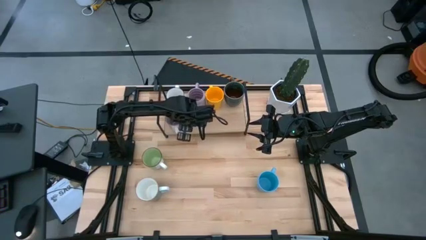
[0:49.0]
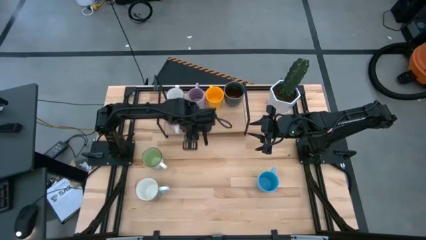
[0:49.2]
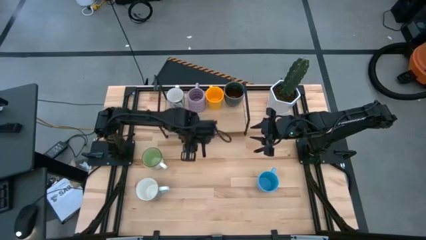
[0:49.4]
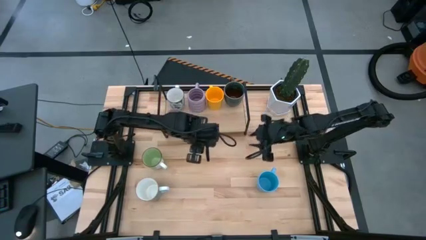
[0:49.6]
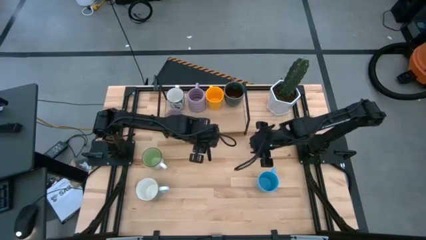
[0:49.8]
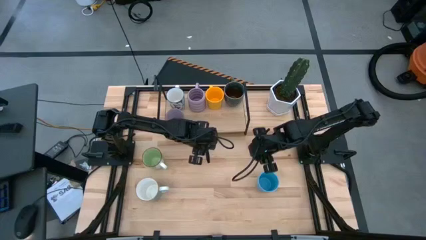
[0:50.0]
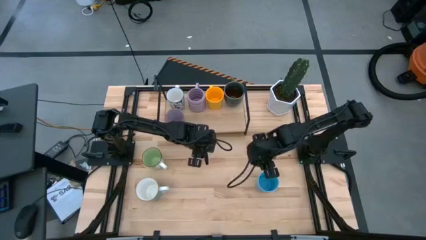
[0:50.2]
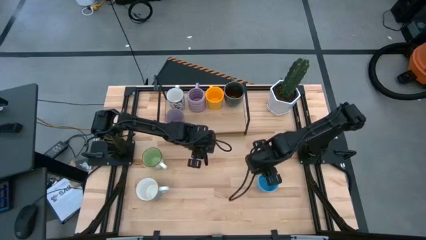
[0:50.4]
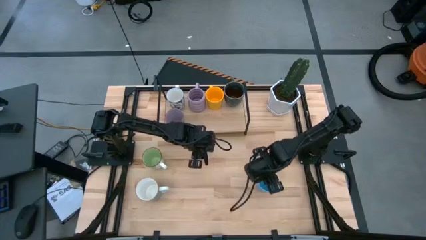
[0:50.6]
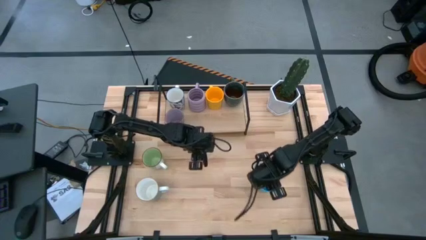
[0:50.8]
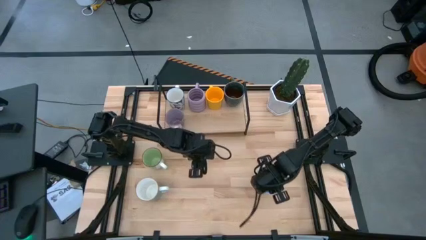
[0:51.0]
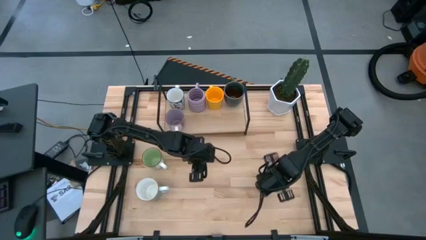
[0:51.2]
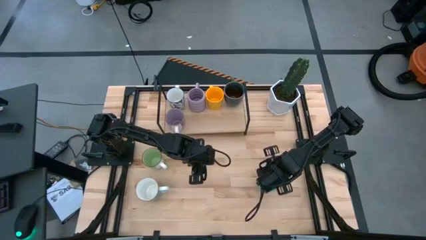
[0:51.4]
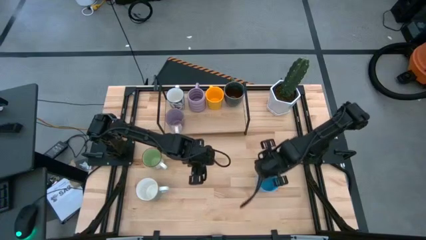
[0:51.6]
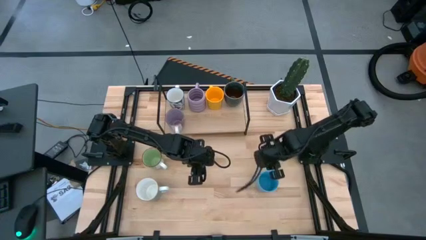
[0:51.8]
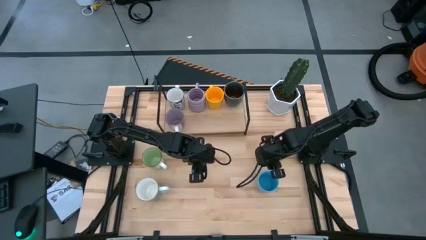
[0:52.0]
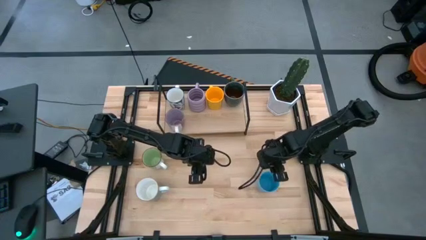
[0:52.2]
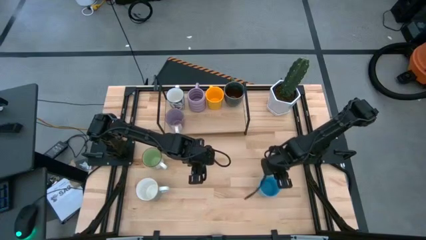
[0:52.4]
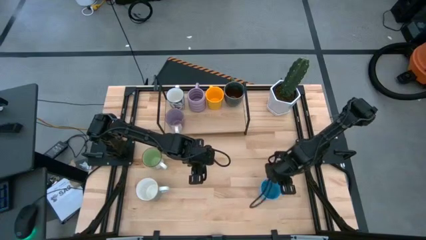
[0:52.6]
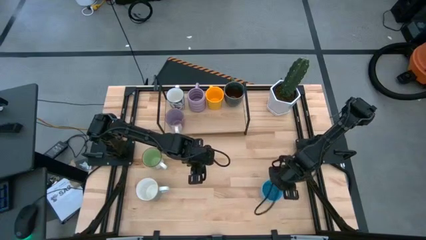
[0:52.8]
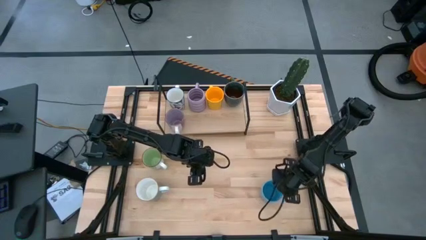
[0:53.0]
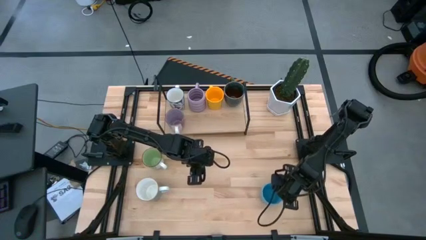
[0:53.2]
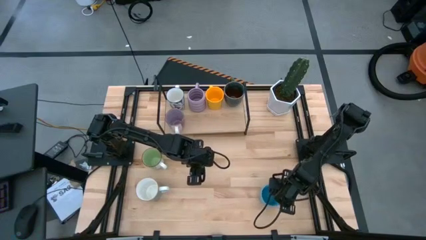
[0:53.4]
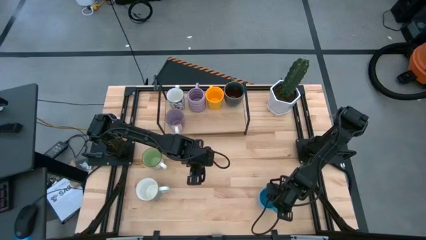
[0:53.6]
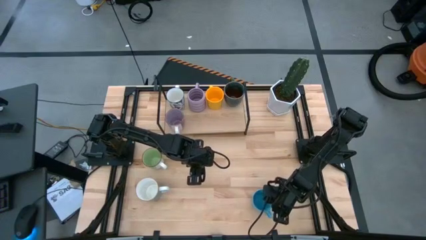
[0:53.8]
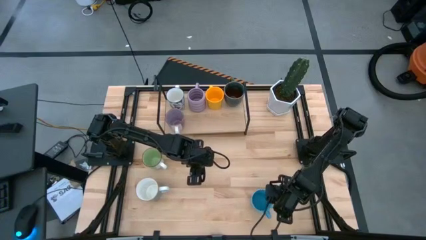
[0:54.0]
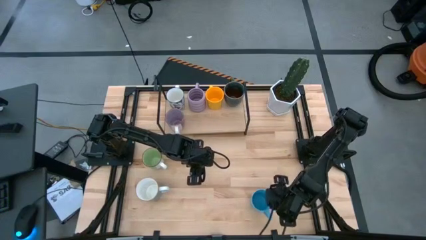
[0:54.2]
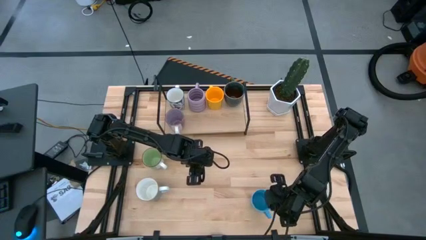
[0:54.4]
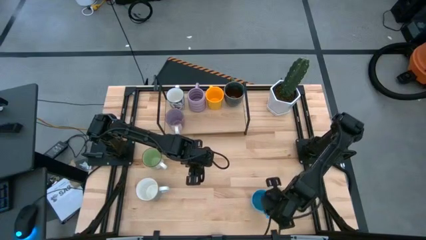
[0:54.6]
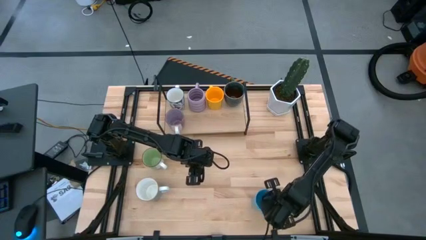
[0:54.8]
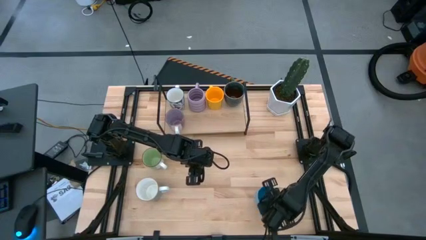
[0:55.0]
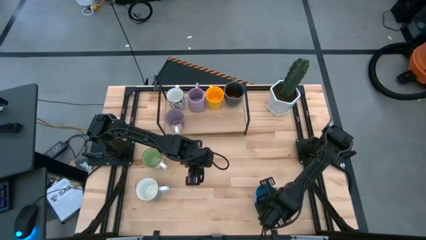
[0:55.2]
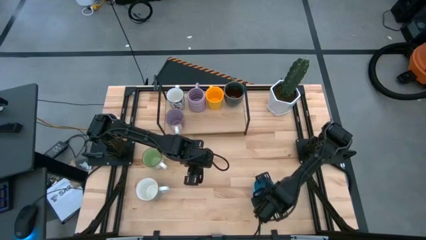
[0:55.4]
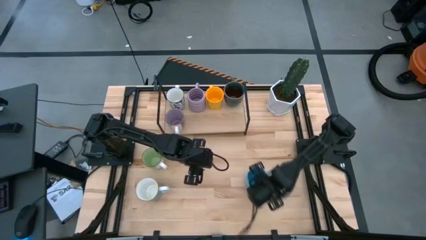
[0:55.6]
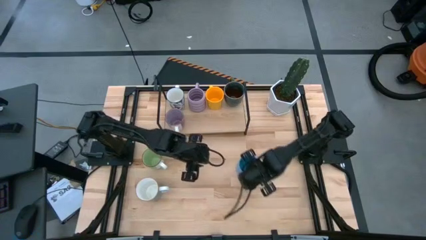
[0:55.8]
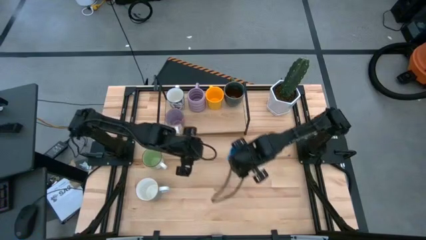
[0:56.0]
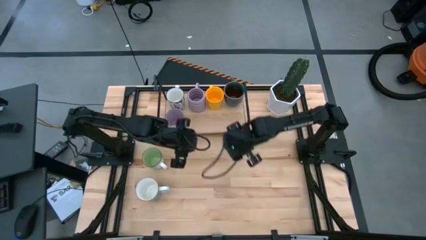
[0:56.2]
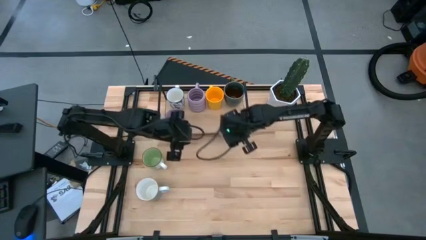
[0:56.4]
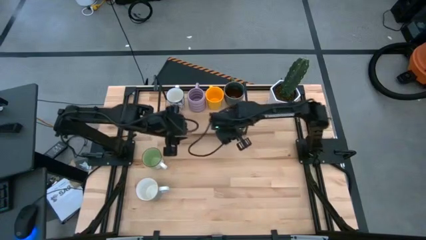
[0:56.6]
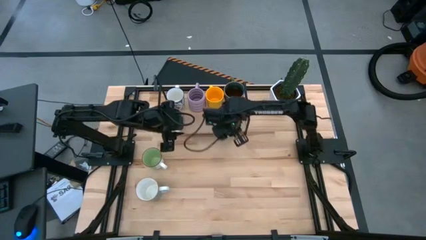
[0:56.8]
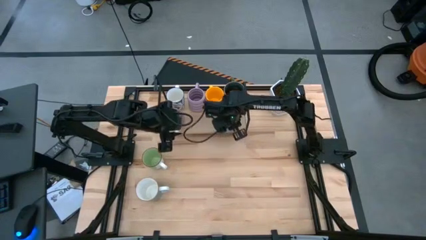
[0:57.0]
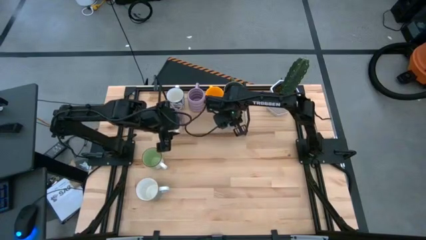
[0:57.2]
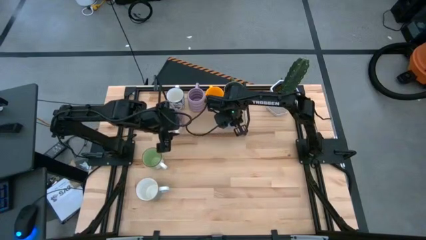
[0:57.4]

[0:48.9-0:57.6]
Task: Place coffee mugs
Put the blue mug on the shelf

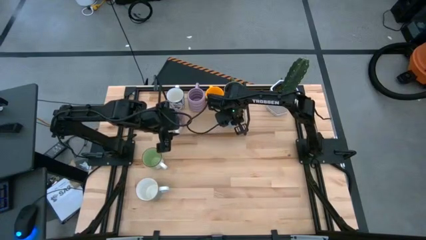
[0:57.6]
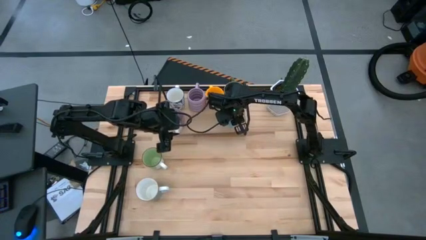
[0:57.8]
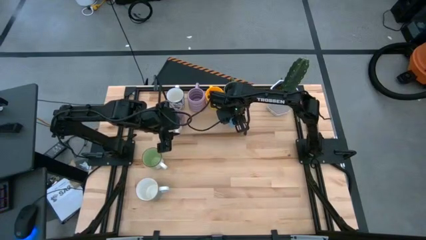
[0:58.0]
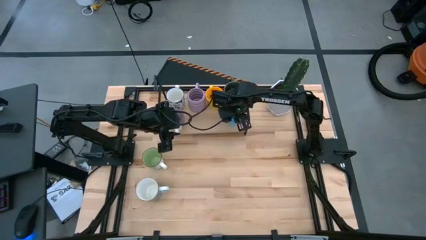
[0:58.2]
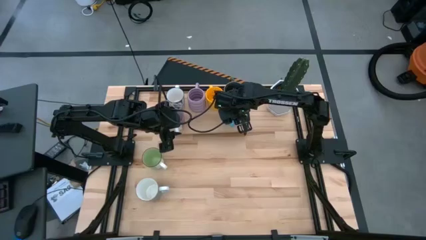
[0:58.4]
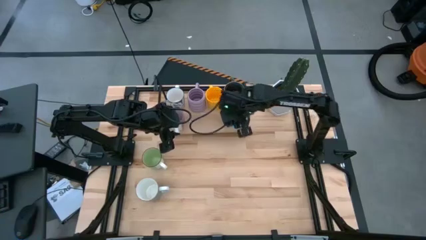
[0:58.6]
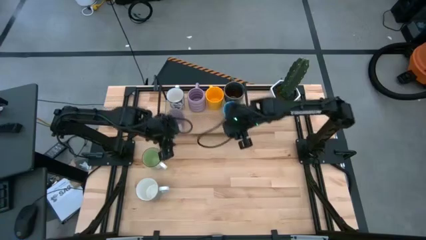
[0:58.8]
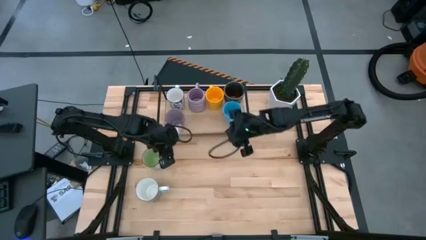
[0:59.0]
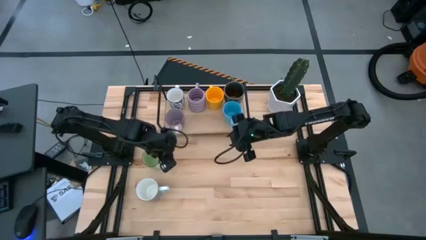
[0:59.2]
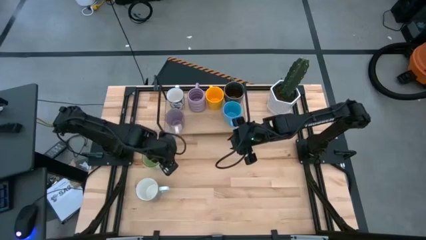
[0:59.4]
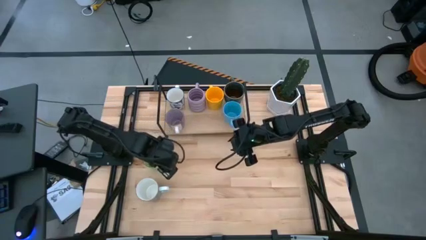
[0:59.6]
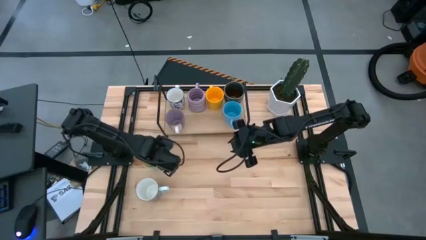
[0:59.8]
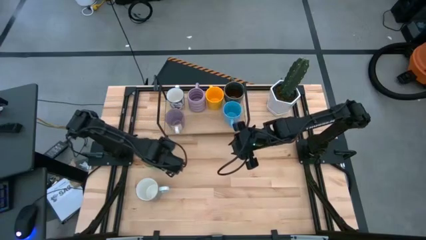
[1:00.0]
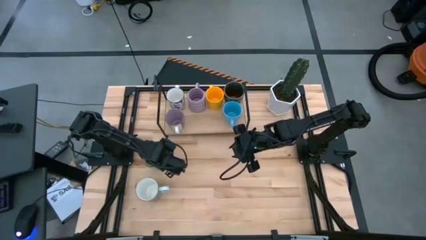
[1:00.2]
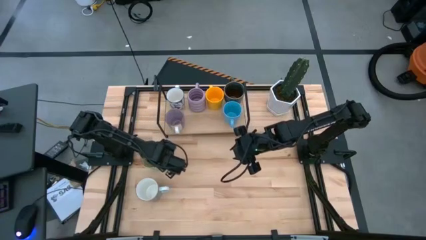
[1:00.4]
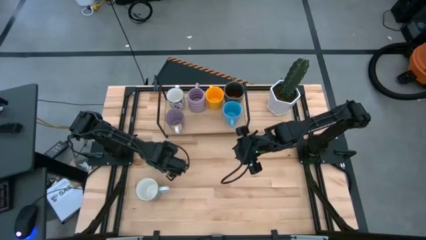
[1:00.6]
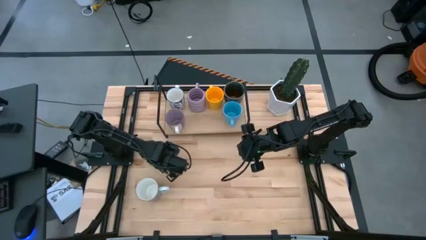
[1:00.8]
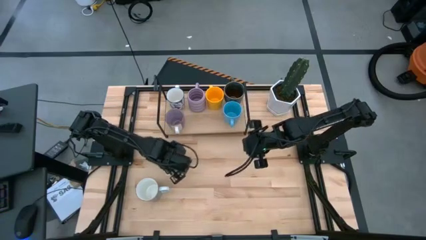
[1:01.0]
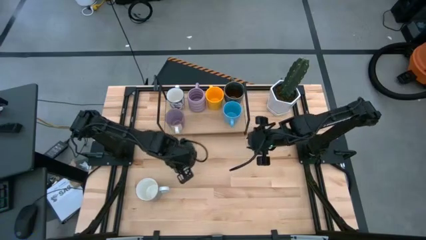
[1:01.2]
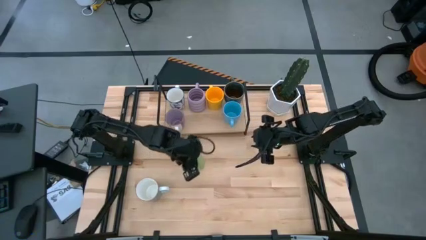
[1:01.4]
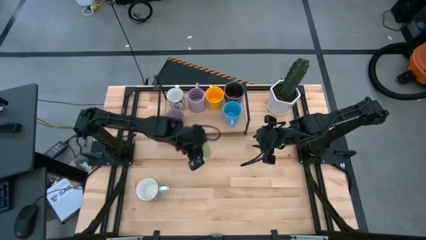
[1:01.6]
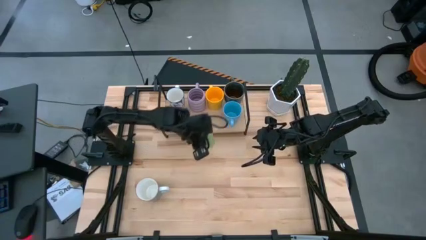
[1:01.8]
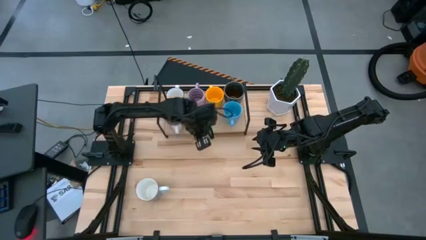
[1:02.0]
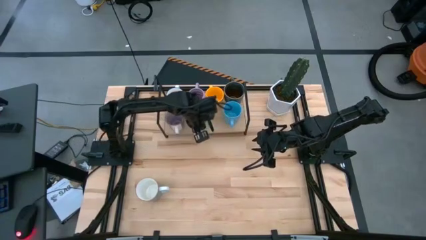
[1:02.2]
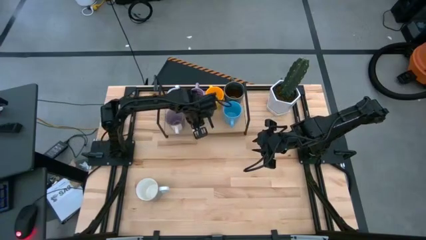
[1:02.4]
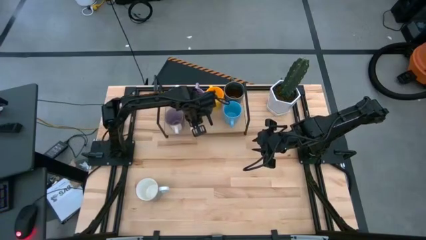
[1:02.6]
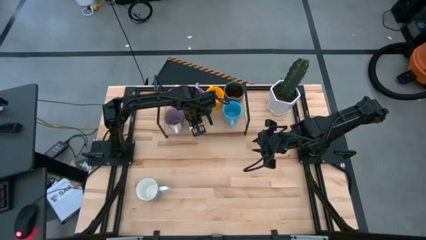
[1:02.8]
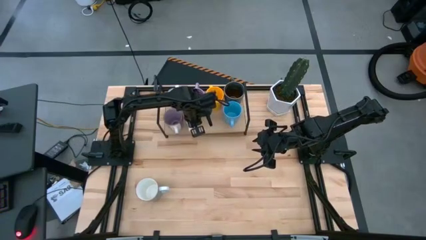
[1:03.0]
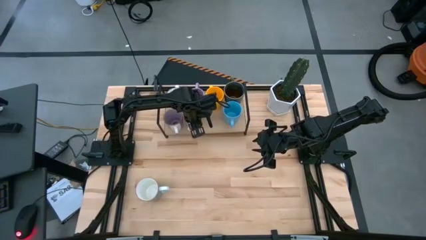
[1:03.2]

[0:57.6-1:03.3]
Put the green mug on the shelf
